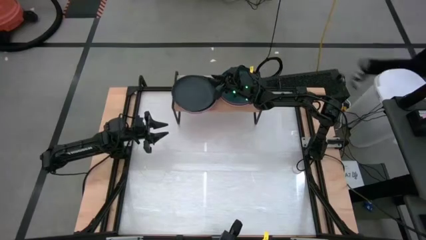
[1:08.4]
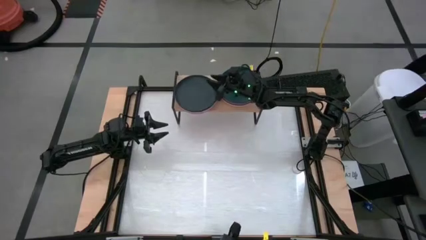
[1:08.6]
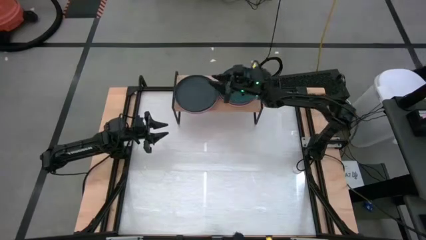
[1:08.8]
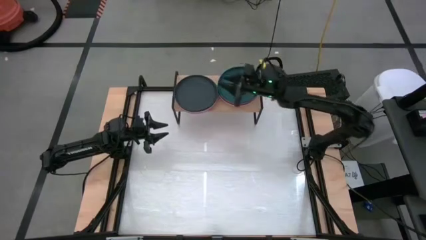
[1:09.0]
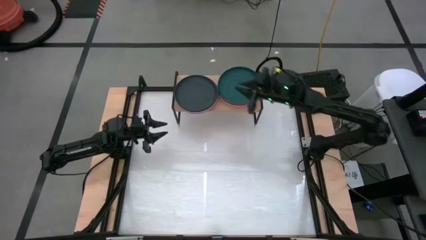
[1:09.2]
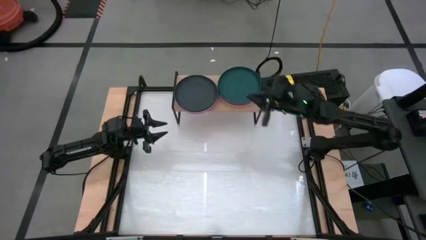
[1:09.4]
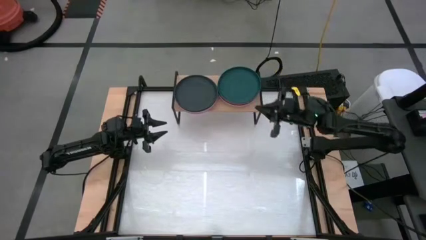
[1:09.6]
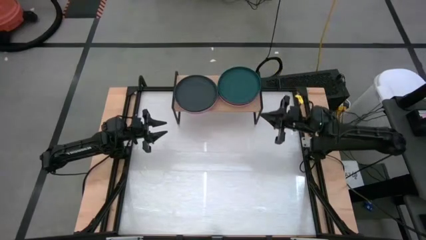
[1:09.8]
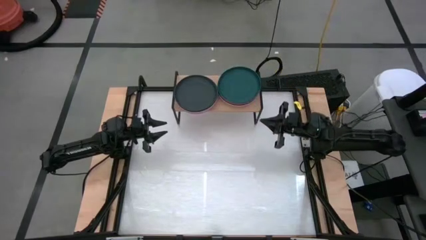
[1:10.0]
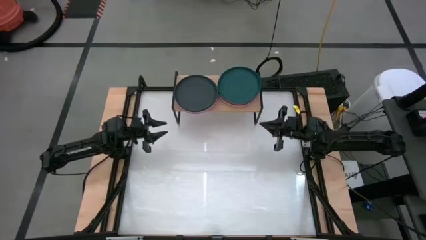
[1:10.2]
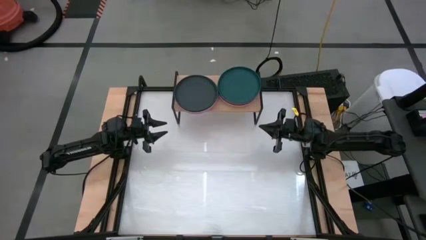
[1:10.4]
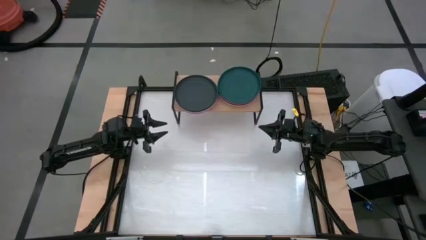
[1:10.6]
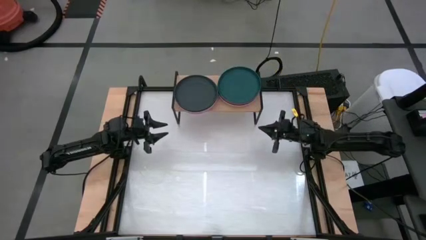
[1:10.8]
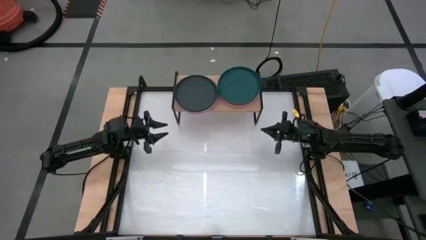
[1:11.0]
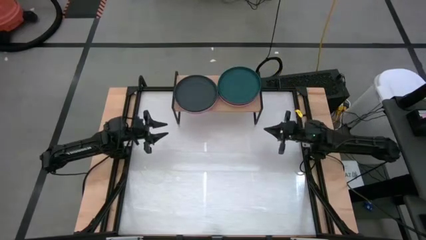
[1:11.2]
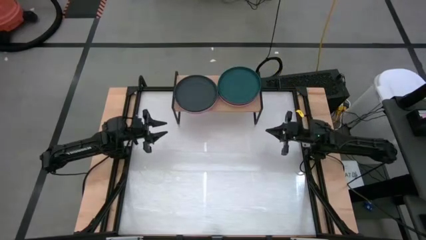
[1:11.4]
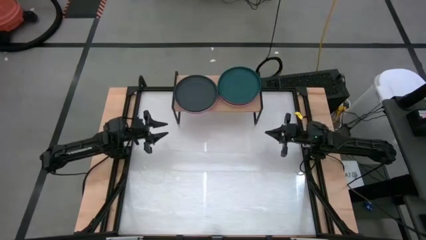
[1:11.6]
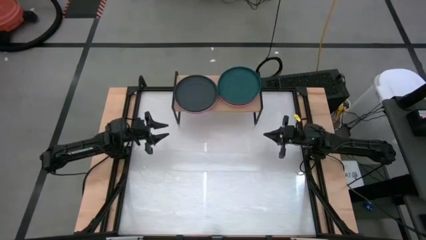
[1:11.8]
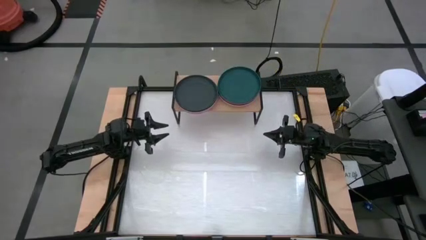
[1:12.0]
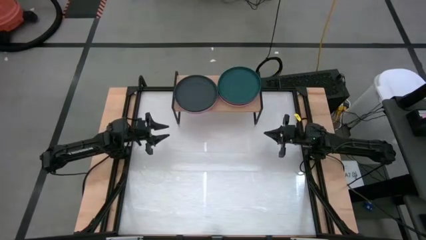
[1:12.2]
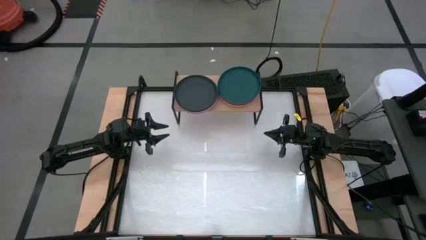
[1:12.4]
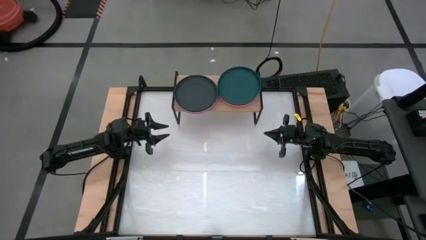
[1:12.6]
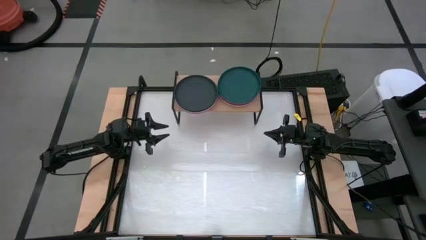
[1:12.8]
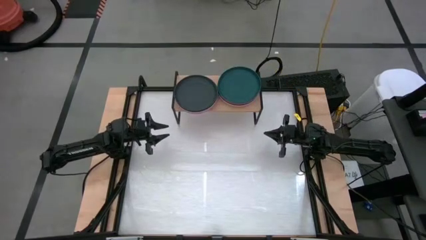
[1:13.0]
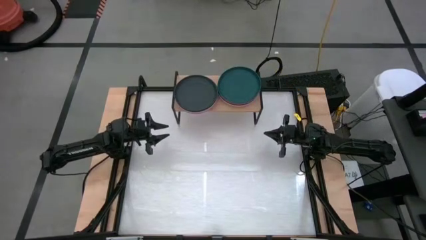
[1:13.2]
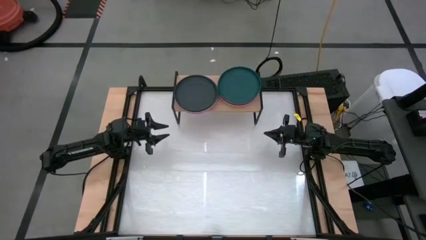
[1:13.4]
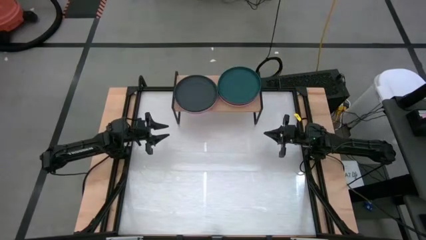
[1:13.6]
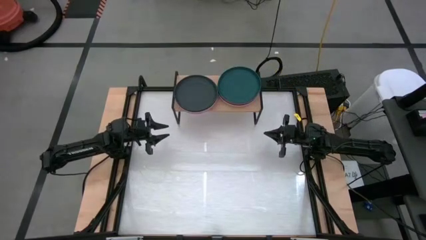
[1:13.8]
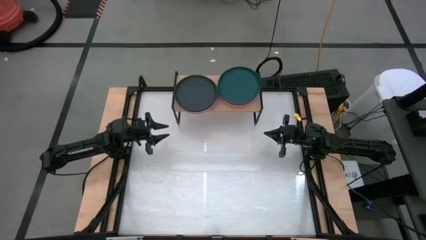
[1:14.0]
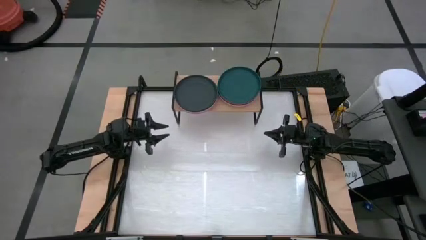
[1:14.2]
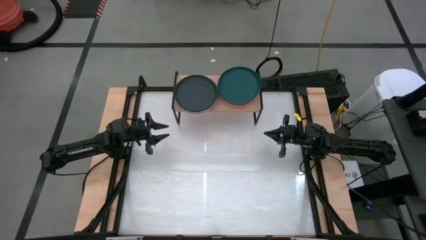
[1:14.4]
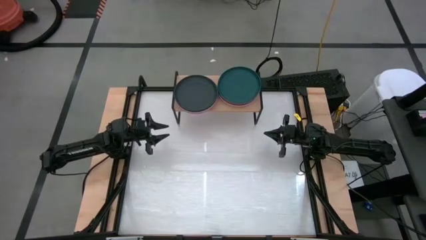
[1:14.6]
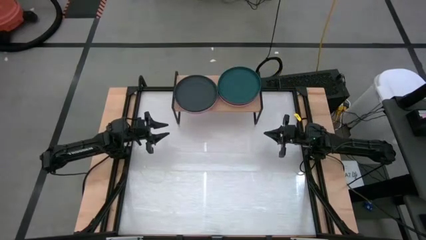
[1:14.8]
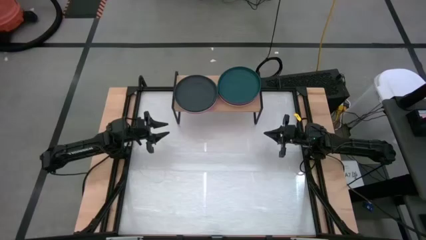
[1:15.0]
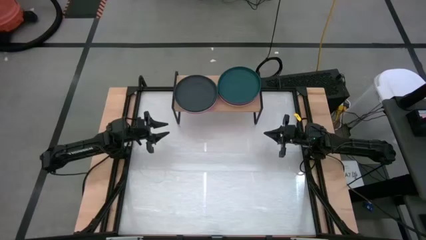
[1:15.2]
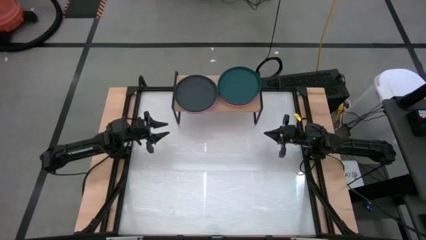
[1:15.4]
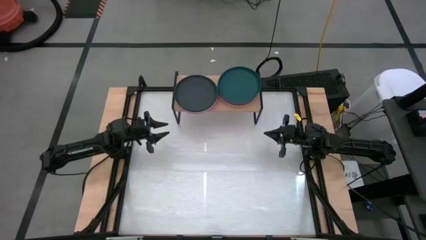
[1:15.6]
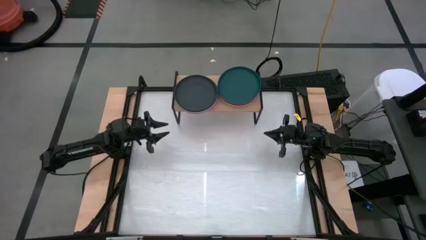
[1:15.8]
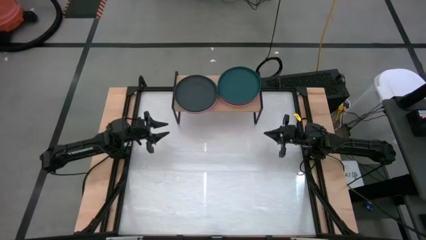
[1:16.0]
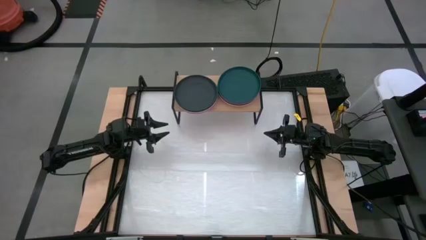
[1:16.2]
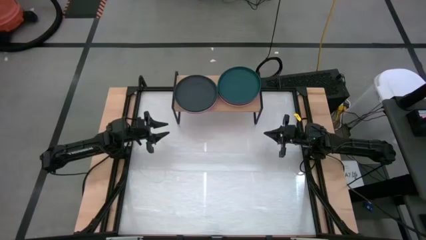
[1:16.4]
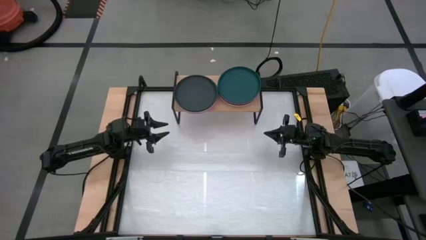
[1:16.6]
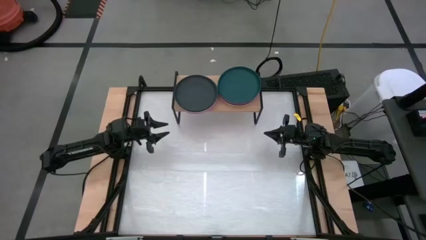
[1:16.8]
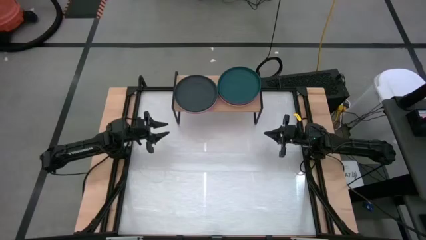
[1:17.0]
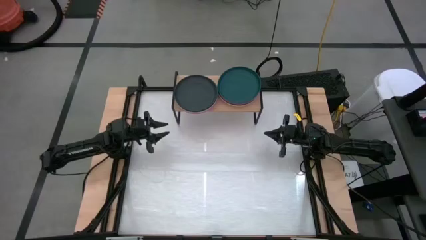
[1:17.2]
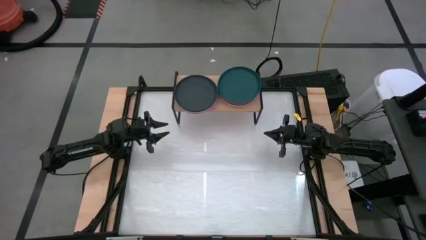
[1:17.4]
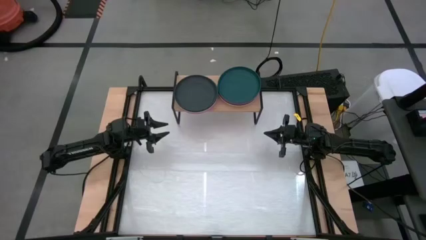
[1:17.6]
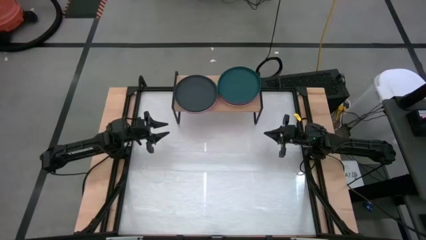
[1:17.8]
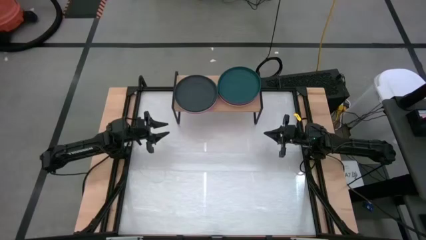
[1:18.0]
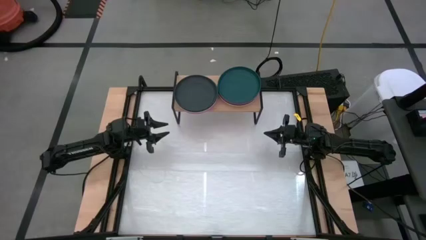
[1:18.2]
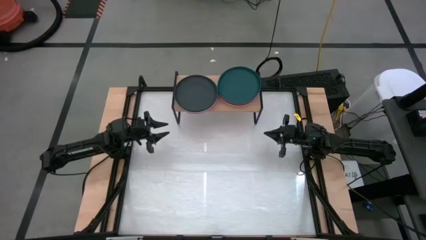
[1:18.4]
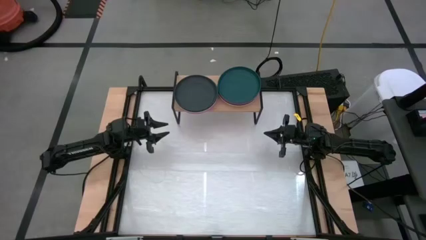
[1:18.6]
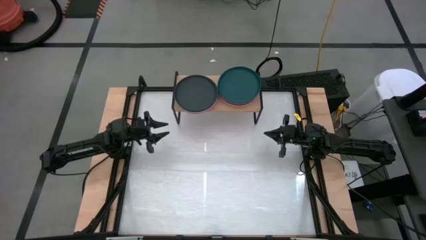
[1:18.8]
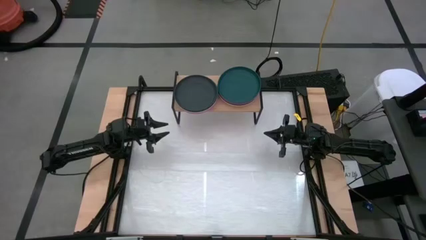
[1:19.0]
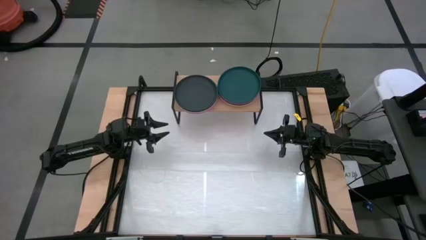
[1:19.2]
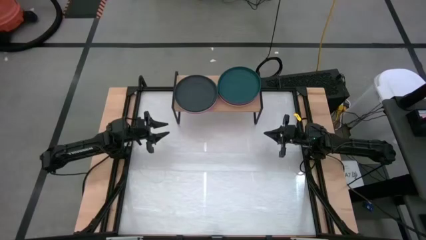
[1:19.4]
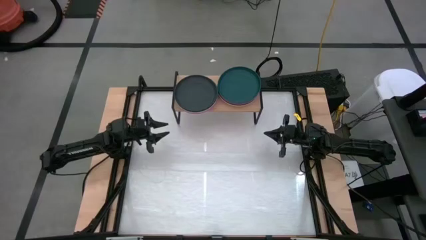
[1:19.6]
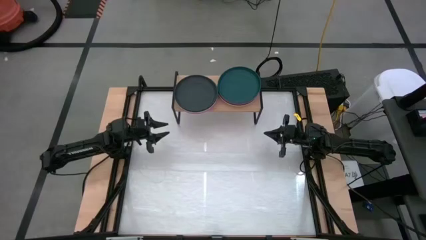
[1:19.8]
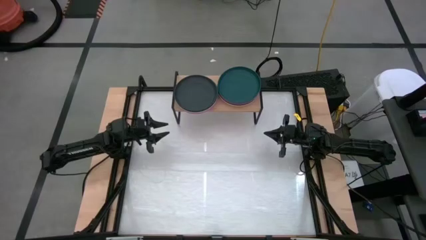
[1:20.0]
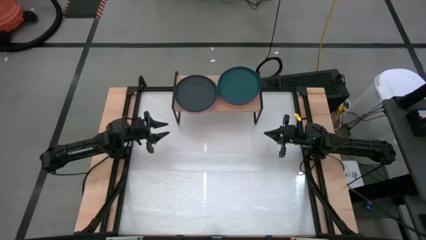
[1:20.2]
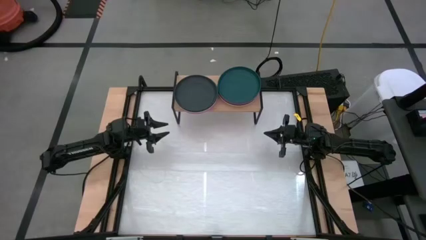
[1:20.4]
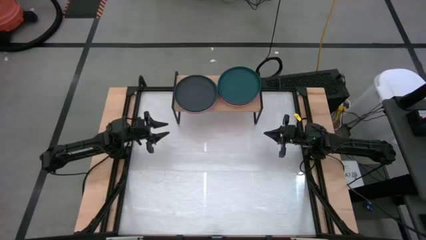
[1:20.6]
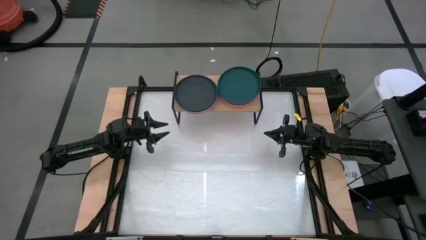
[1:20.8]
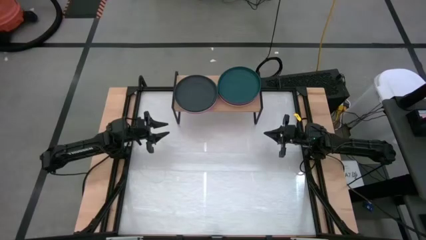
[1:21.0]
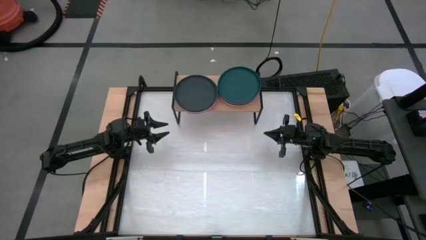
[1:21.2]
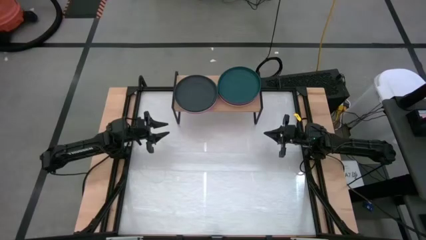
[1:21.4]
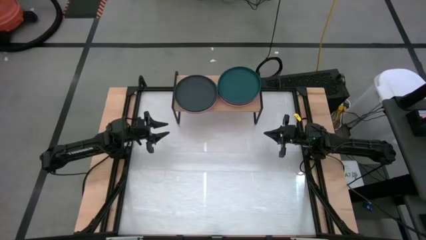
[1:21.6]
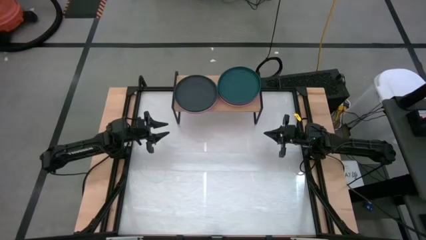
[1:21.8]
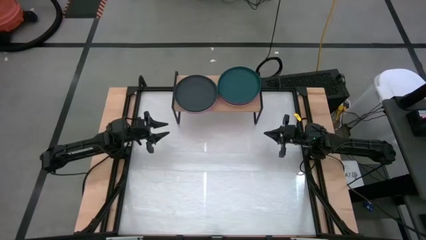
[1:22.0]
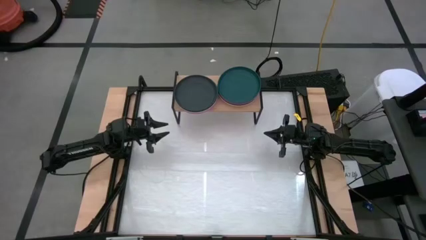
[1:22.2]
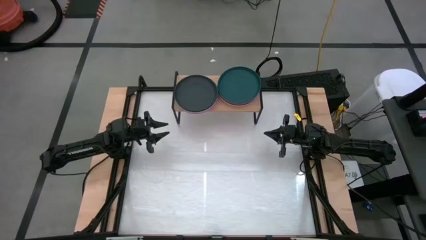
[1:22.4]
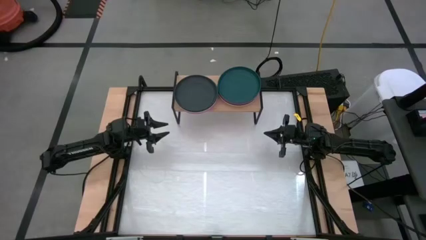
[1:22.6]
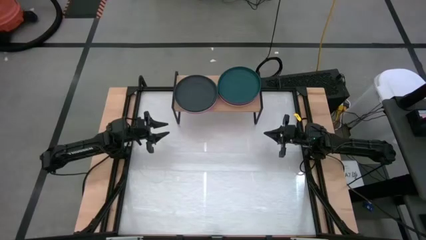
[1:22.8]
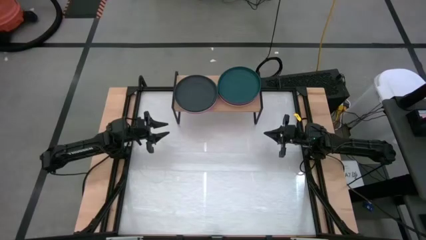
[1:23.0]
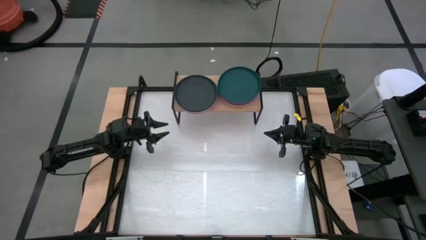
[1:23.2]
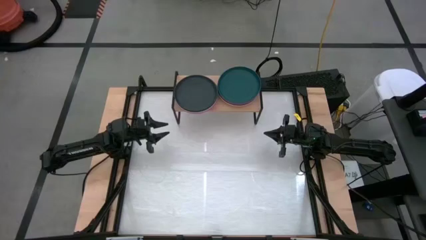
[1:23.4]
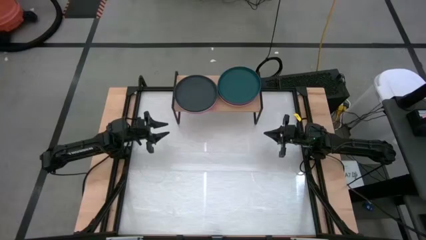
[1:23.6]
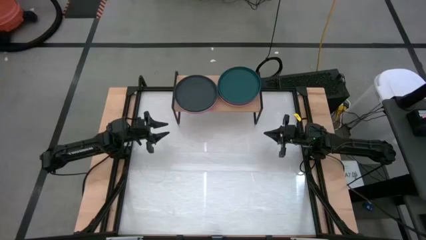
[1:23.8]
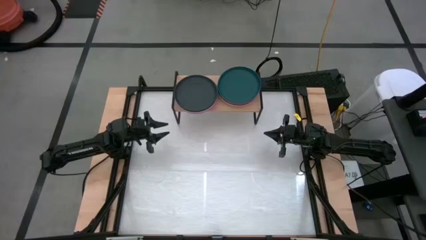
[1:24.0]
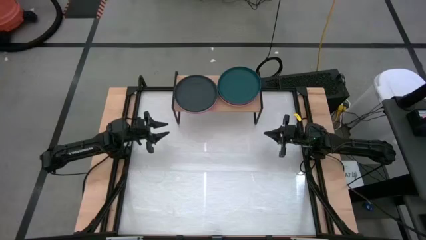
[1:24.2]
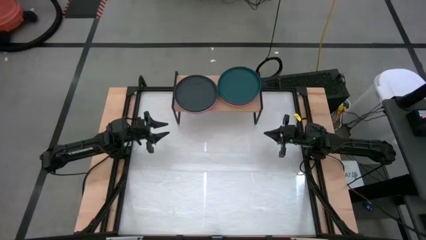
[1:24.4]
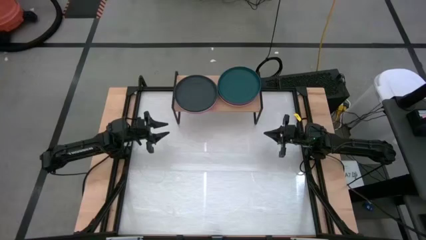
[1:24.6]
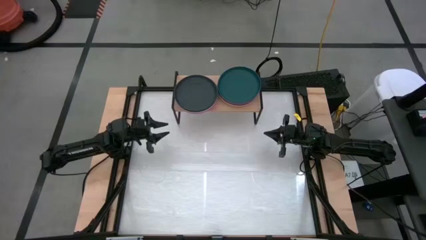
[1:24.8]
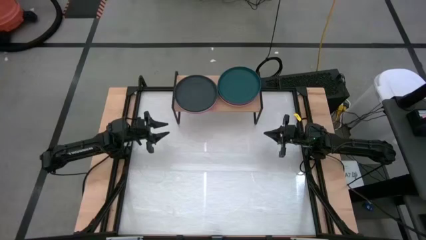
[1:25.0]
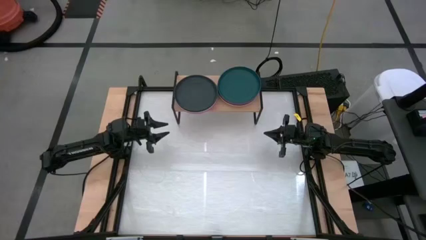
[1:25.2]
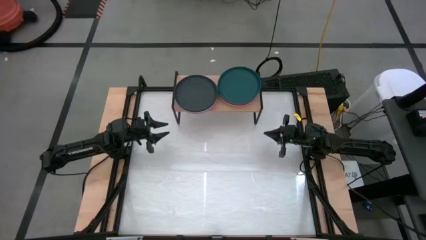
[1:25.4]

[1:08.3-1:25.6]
Task: Place and stack plates onto a shelf
Return to Home Position
